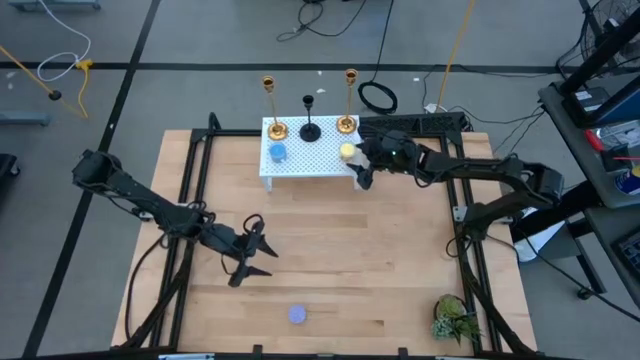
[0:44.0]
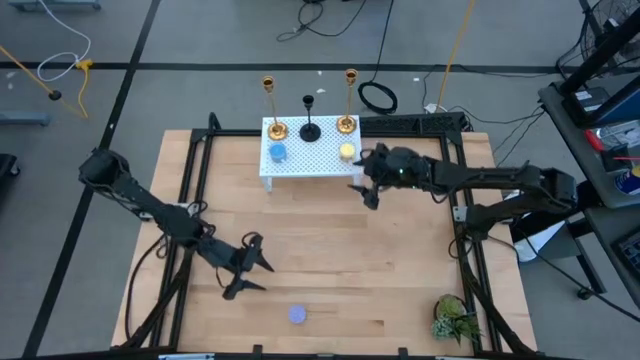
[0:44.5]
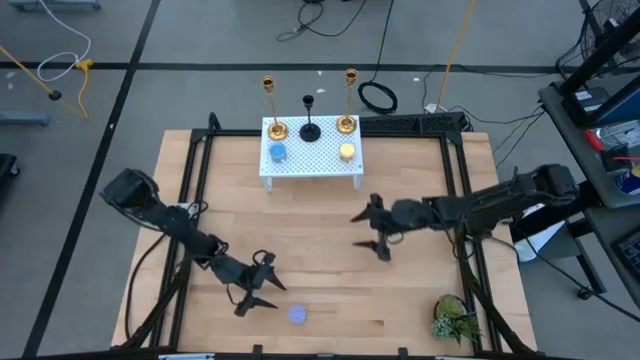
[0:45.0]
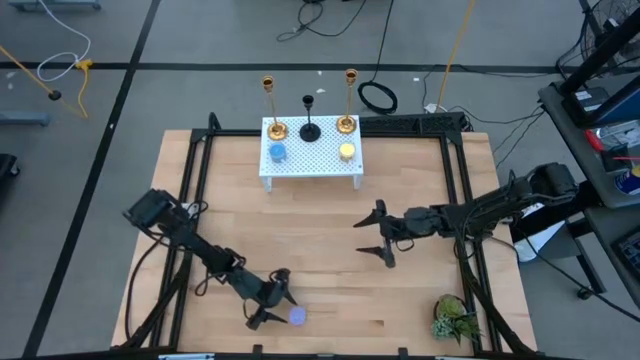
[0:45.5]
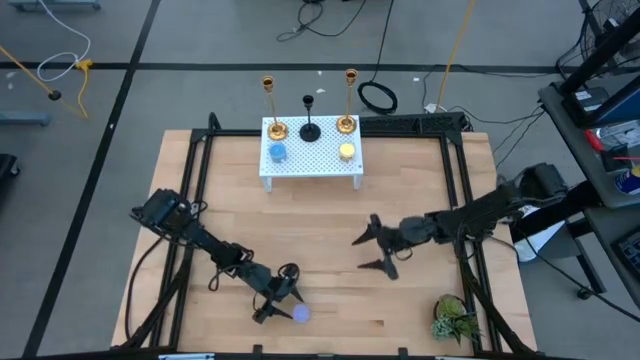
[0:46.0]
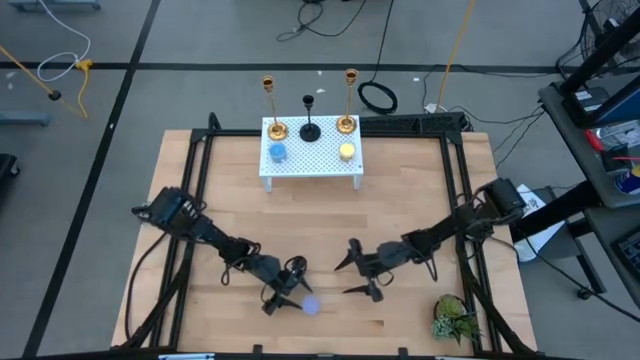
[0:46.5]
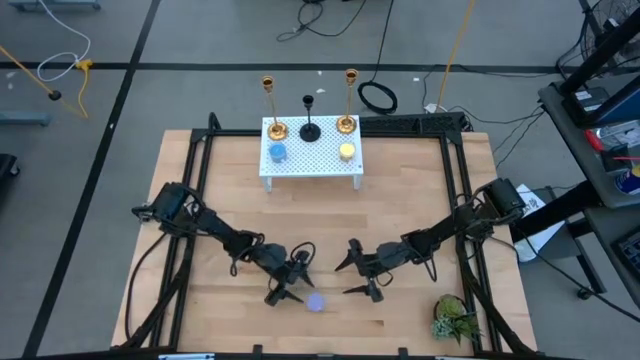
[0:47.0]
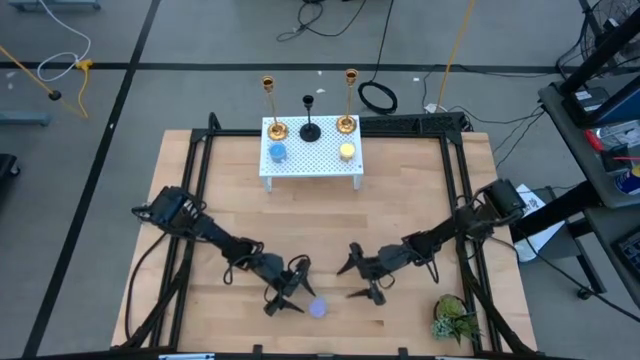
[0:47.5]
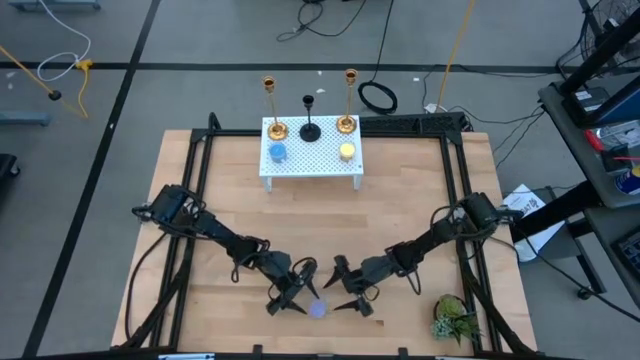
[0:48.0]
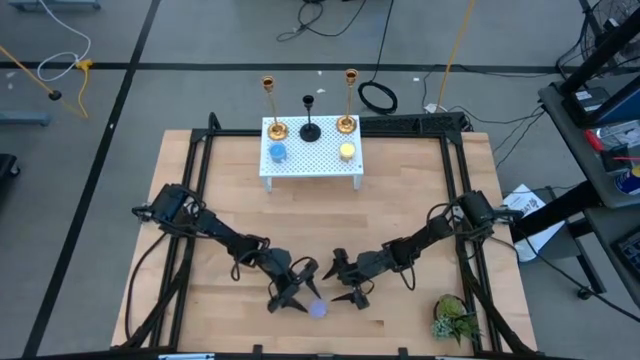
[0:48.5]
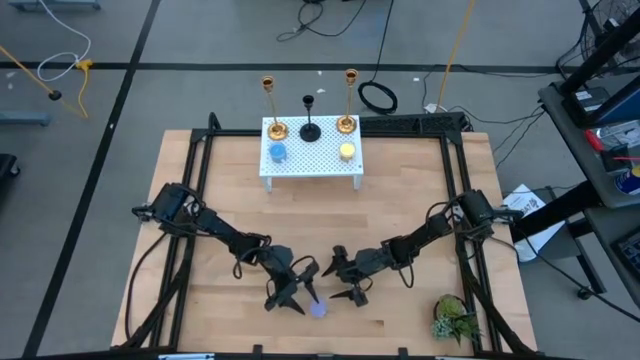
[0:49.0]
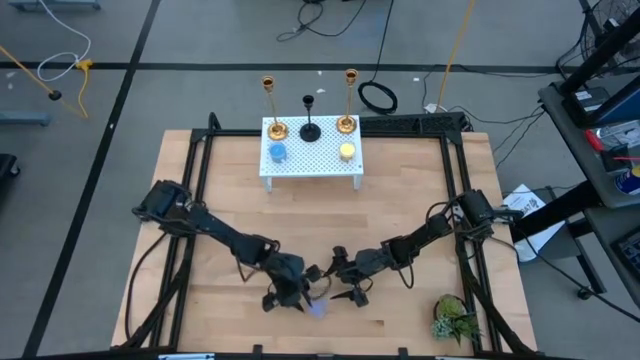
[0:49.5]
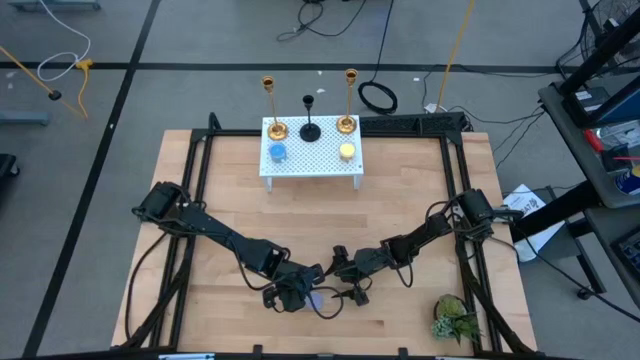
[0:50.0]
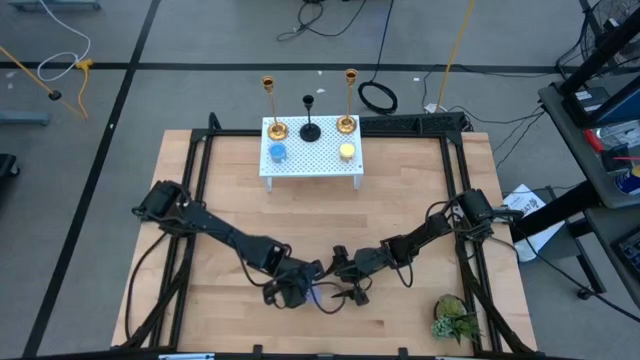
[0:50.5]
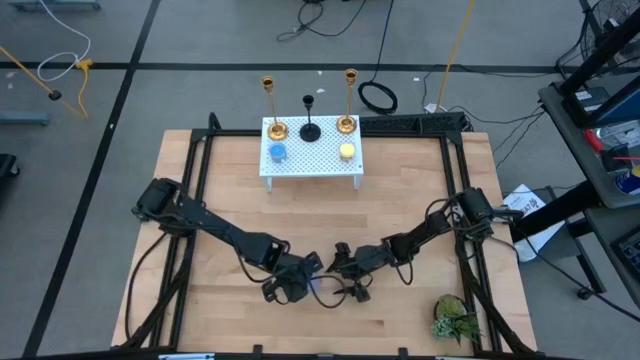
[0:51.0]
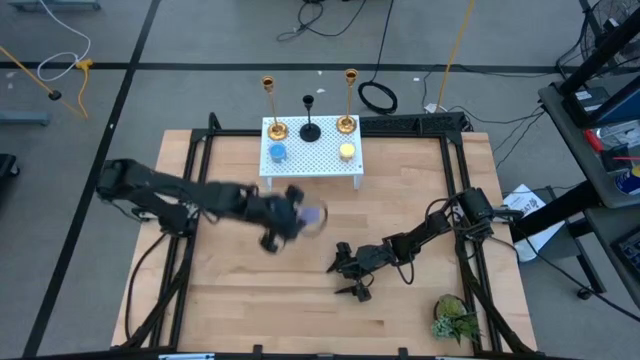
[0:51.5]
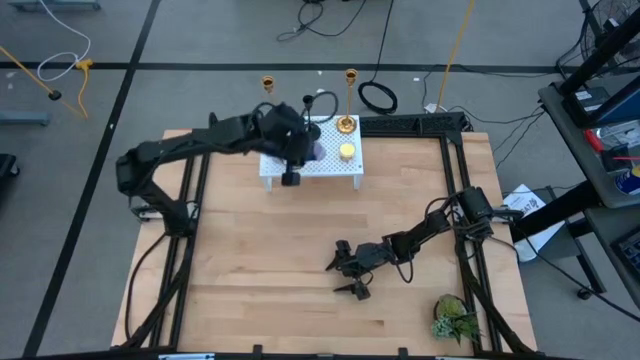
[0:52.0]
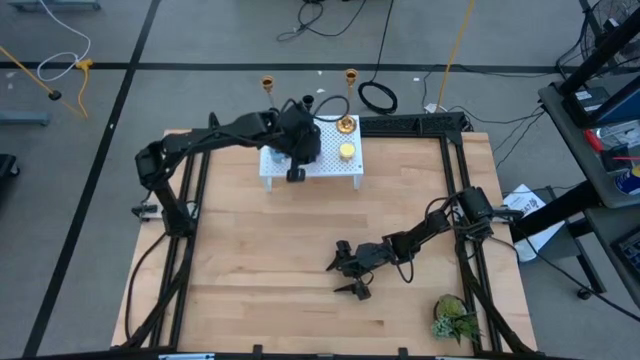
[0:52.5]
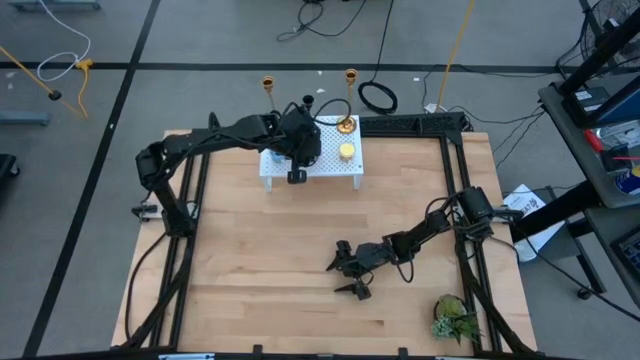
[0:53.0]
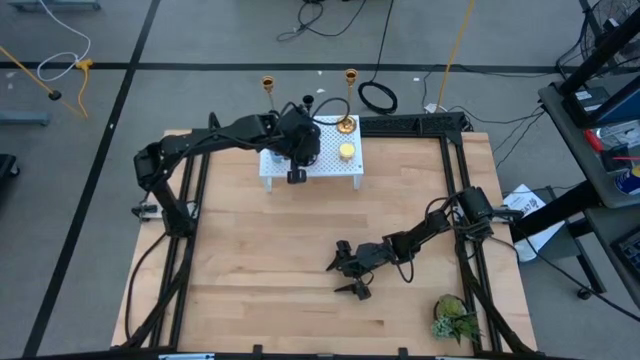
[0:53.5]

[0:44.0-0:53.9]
Task: Pick & Place candle stick holders
Put the violet scented candle on the shelf aligned with the black candle holder

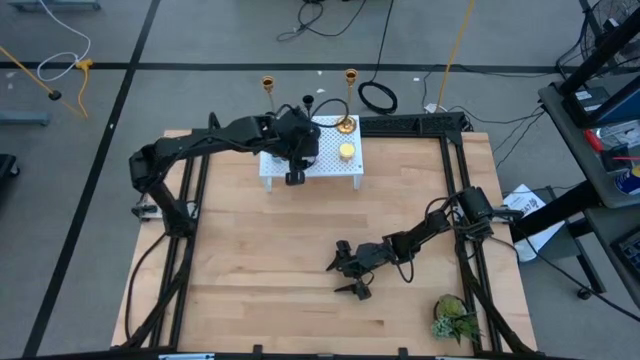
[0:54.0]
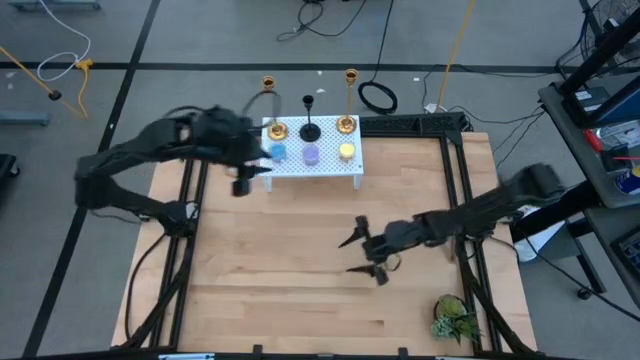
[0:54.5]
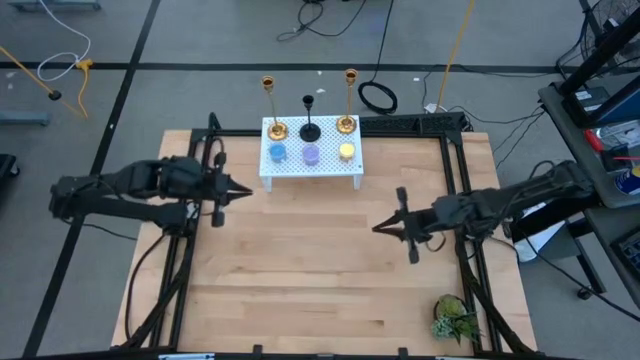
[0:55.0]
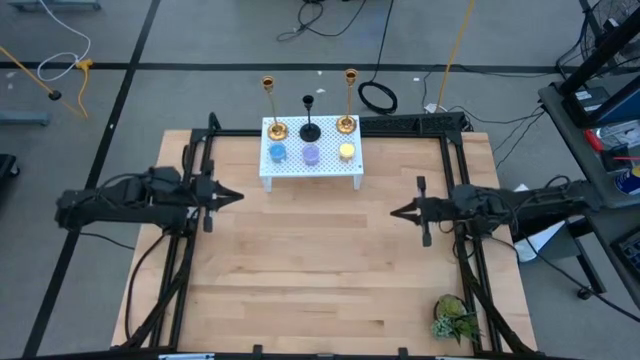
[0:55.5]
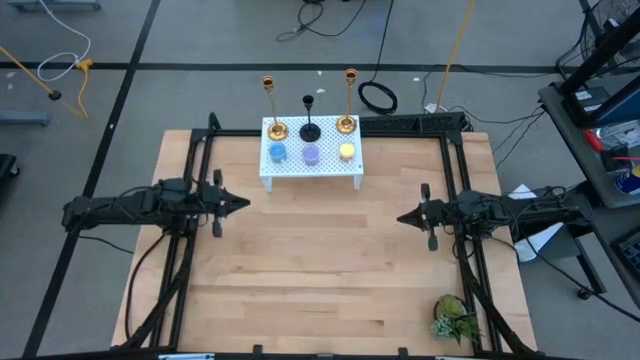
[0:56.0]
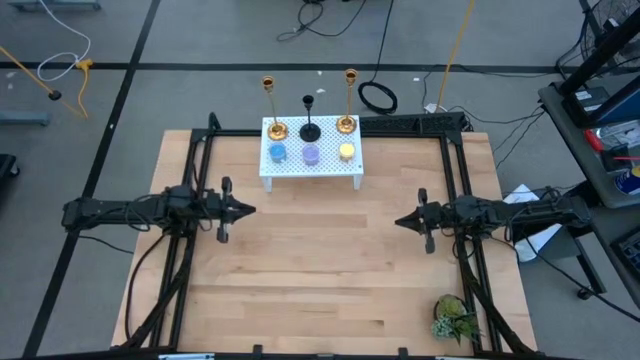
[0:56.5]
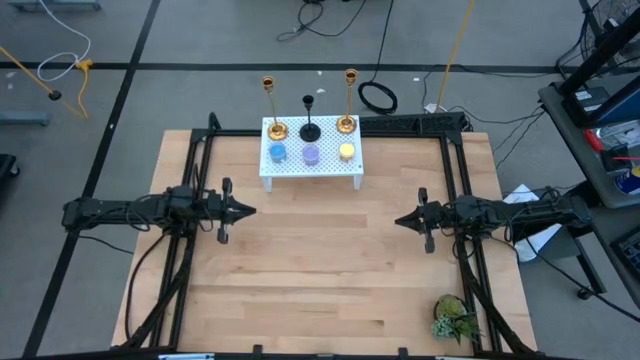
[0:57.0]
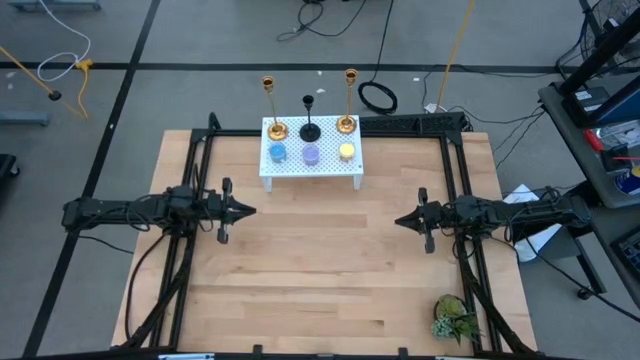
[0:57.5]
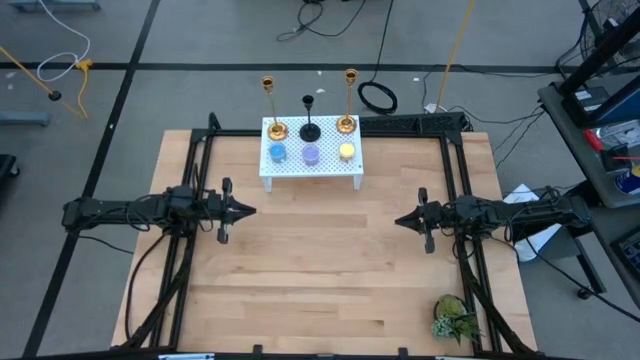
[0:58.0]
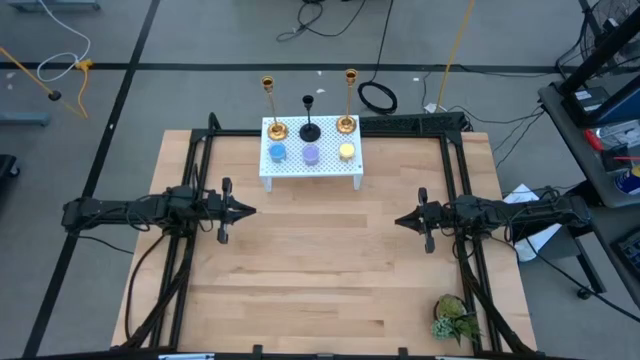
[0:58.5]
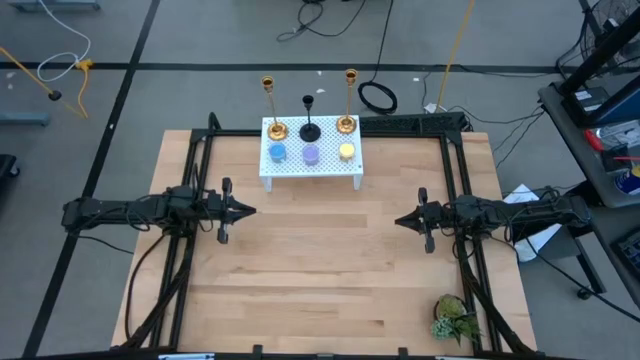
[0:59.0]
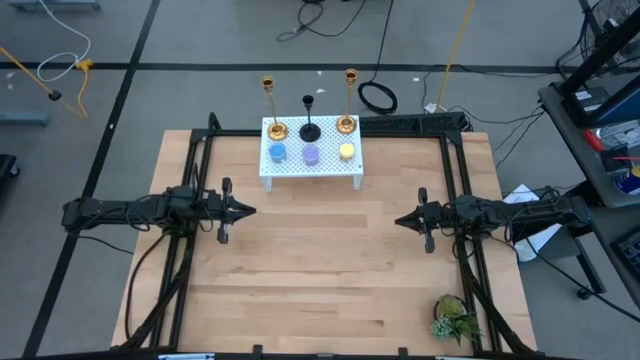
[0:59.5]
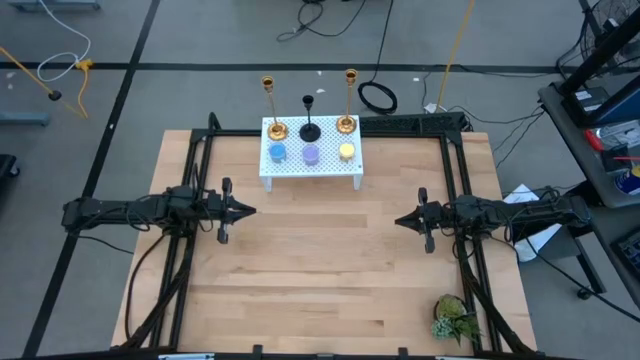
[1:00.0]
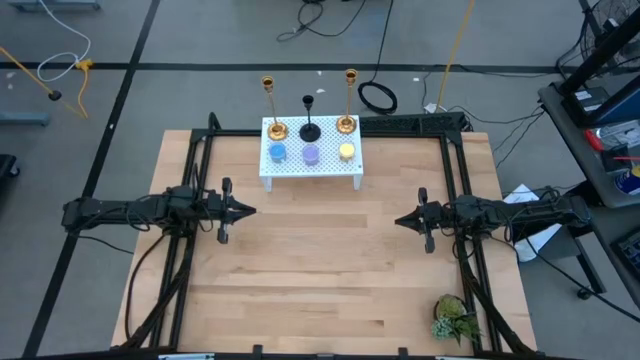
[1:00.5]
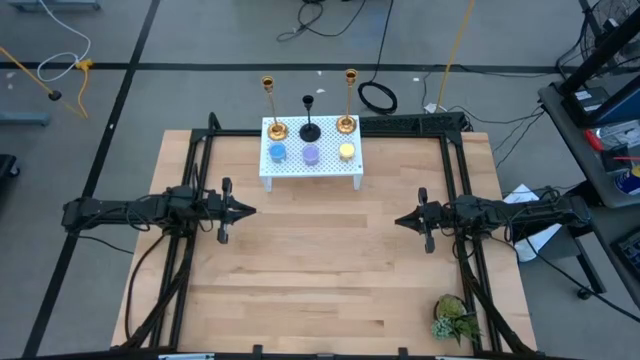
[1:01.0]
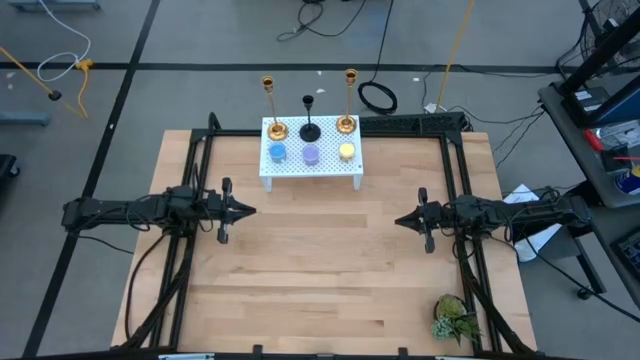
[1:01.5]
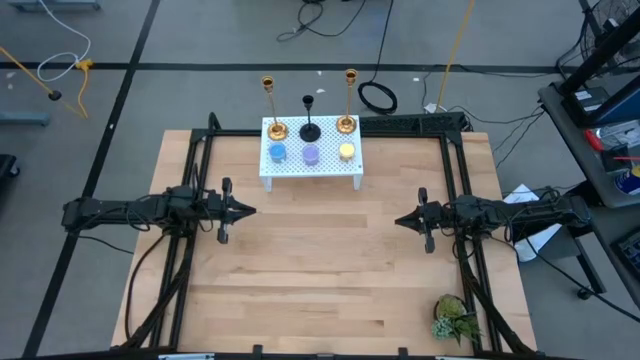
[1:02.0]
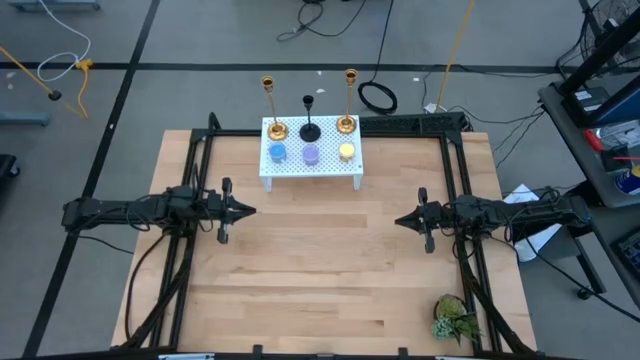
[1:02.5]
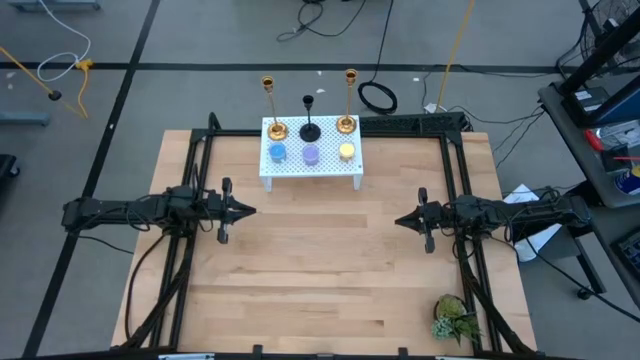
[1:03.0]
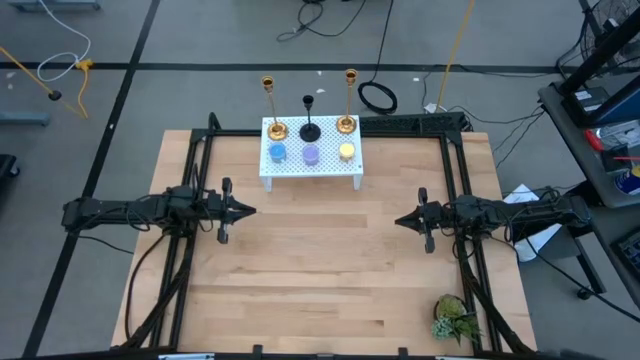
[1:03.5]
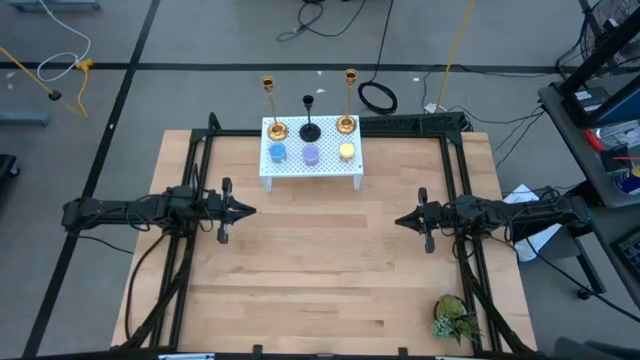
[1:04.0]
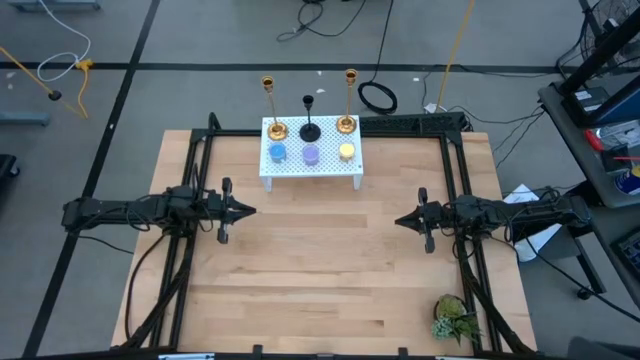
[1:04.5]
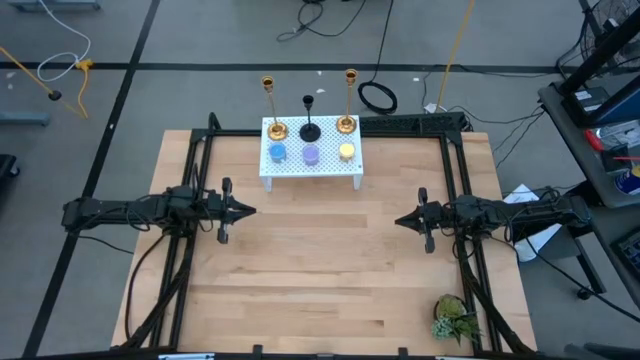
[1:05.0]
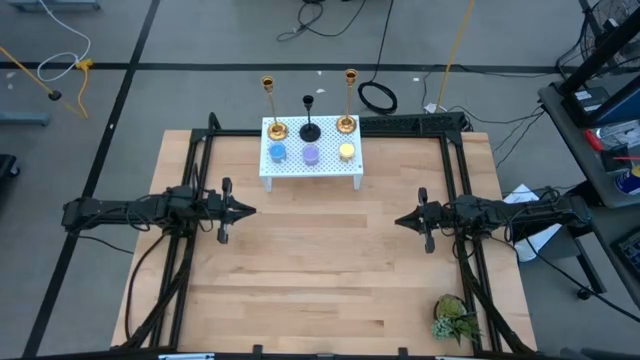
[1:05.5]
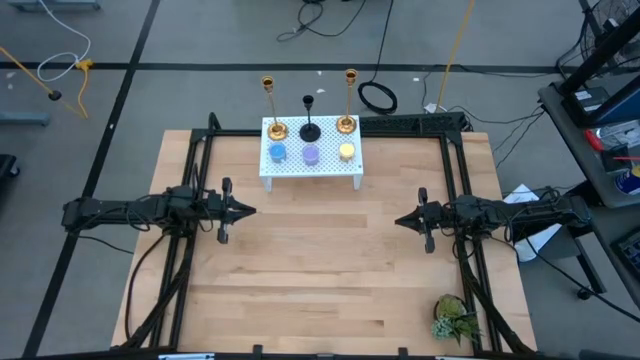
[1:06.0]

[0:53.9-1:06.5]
Return to home position
